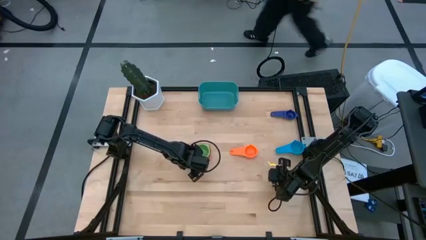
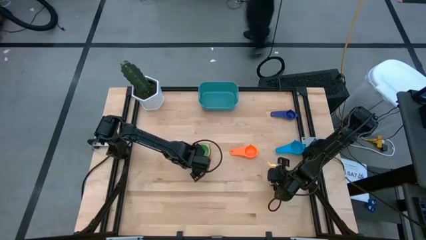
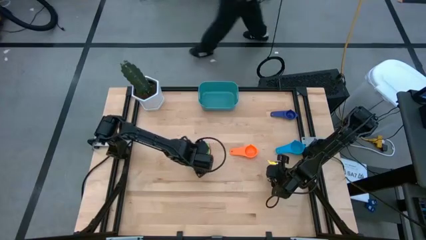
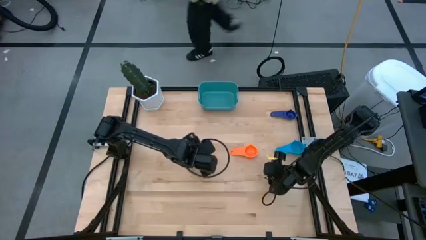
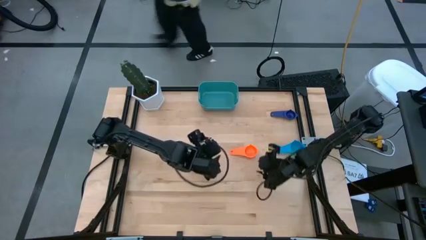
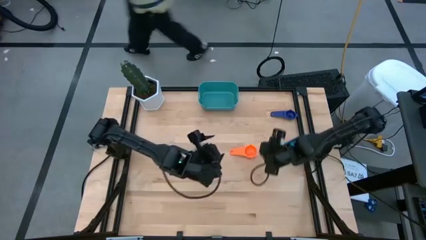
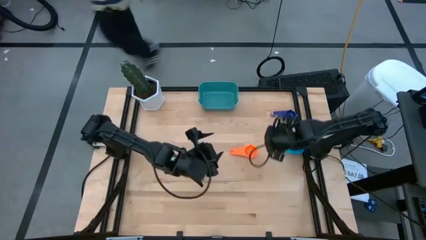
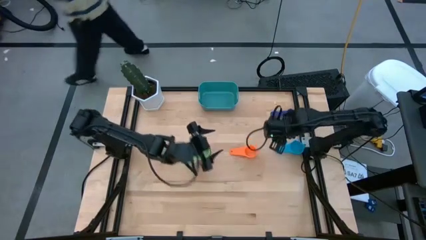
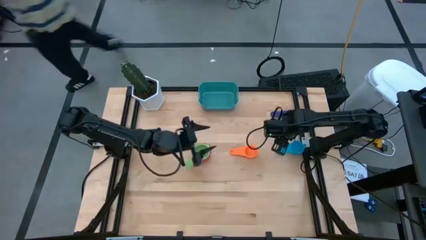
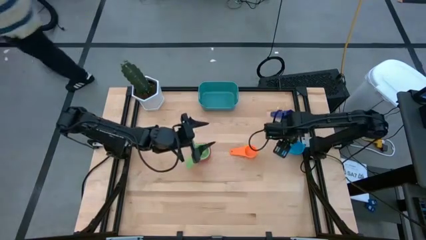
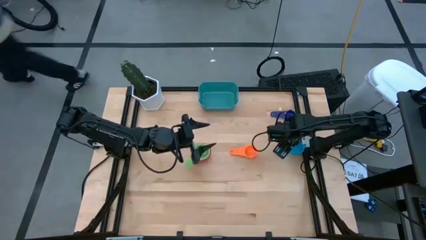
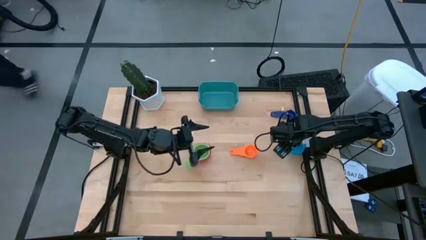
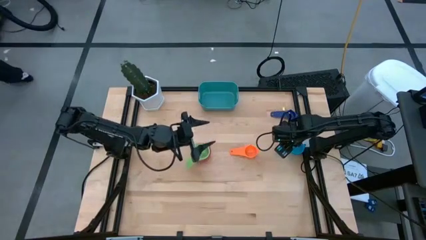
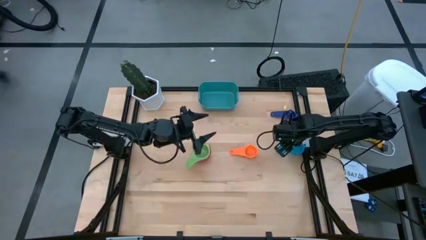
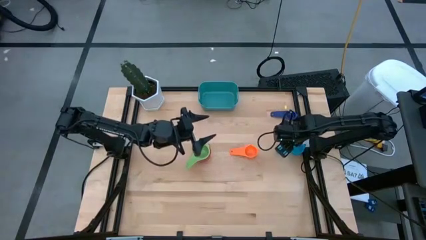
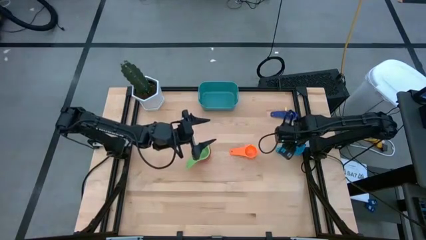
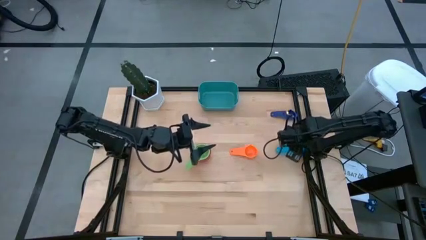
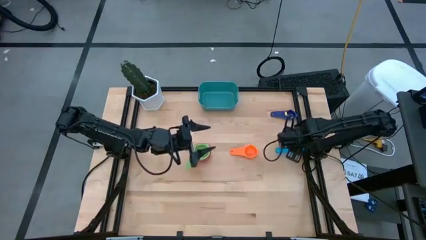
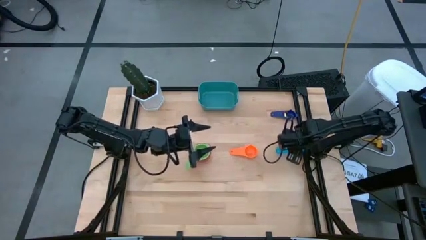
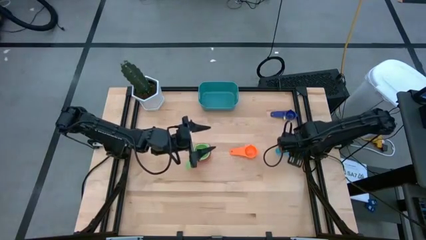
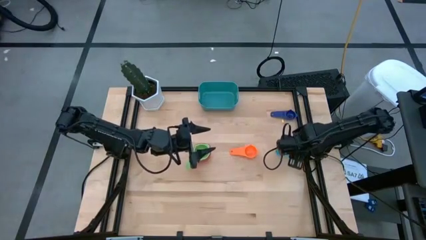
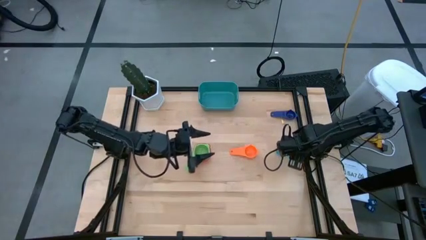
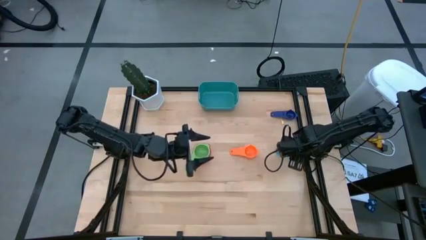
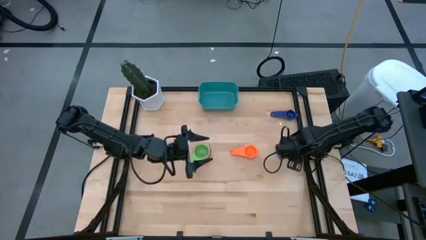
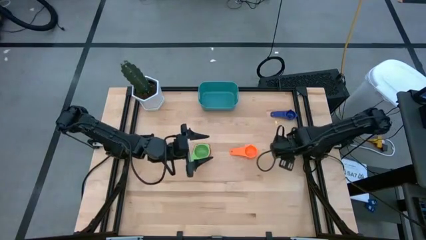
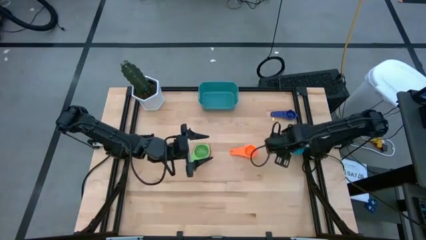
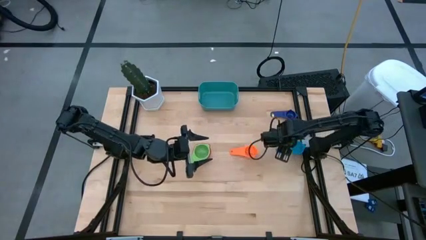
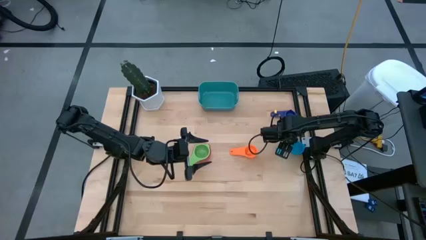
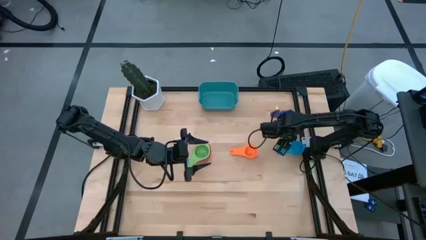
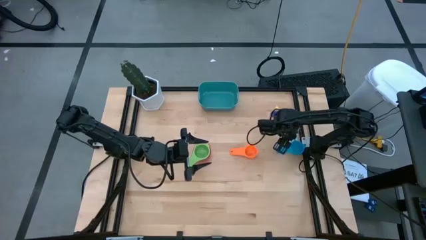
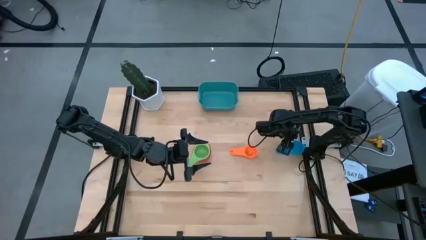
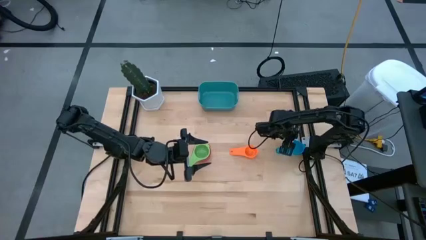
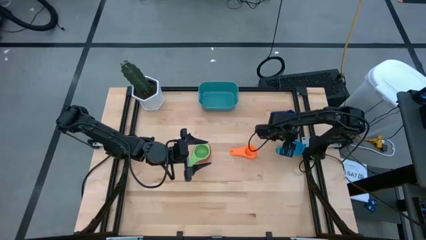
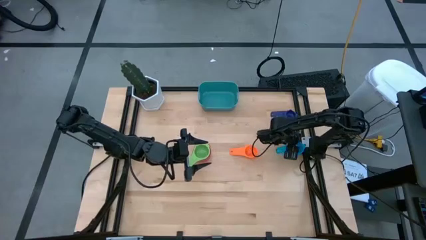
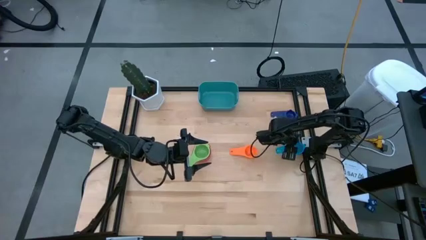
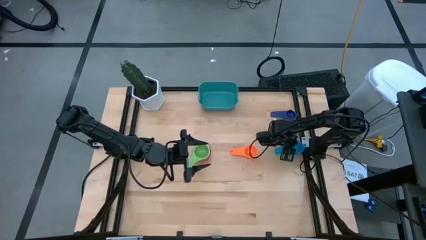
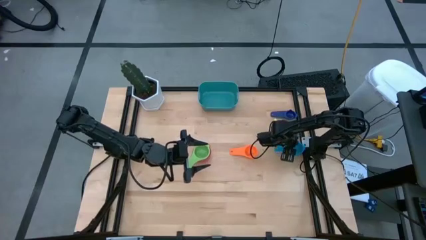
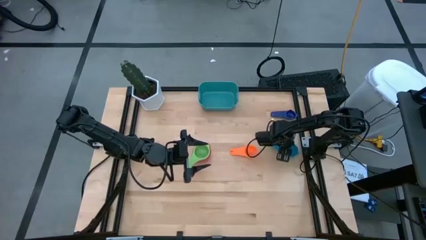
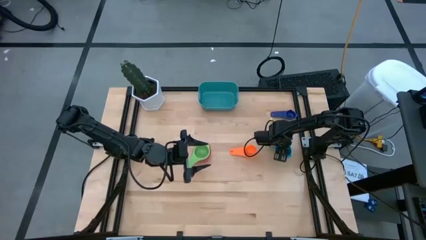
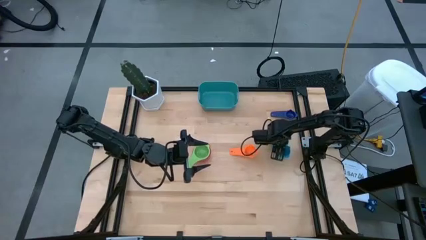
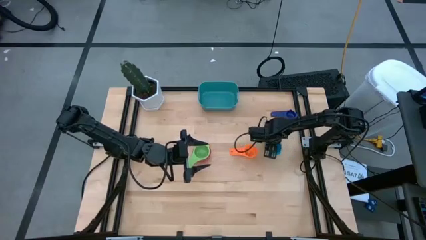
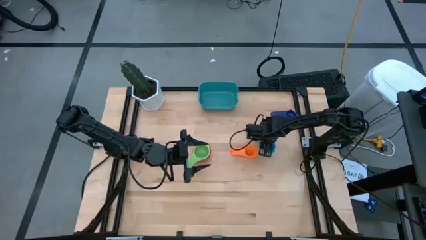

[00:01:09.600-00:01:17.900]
Task: Nest measuring cups in basket
Move the blue measuring cup slightly left on the table

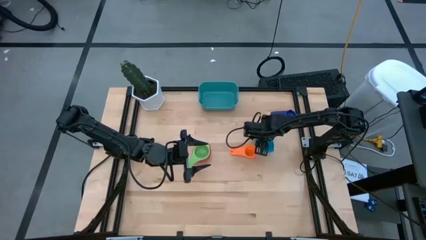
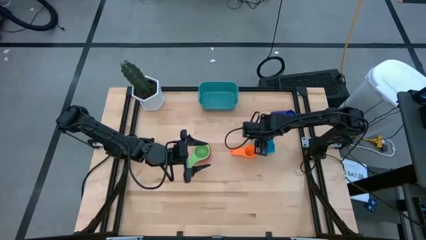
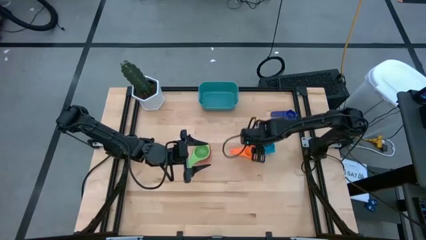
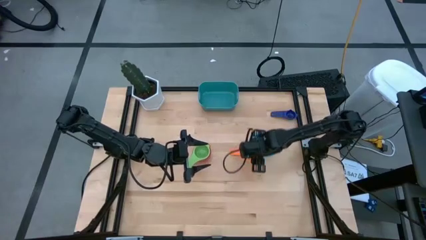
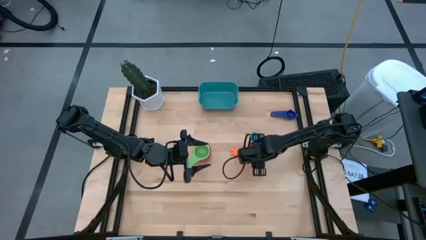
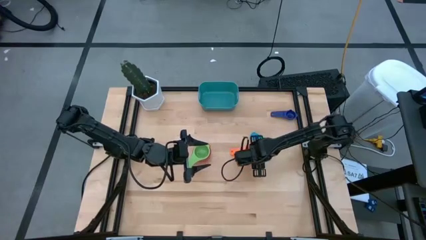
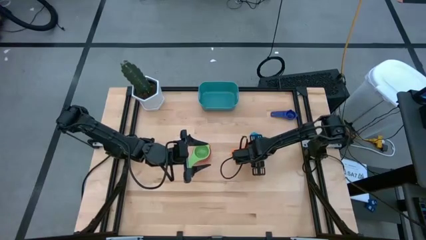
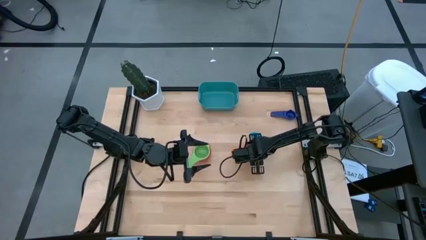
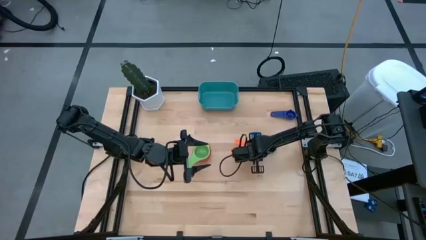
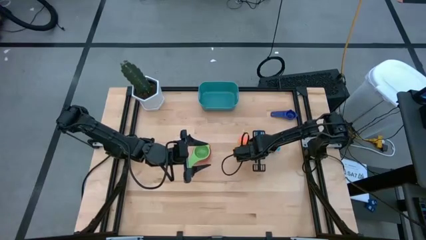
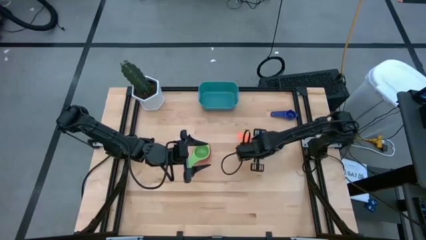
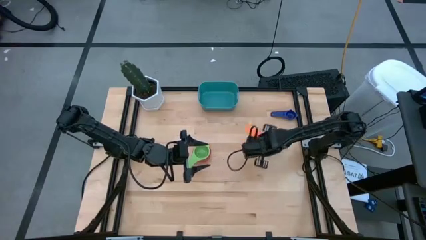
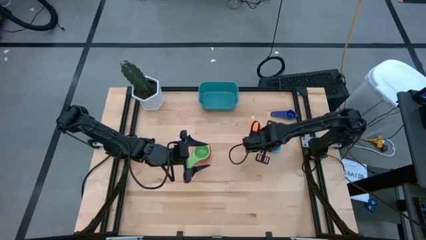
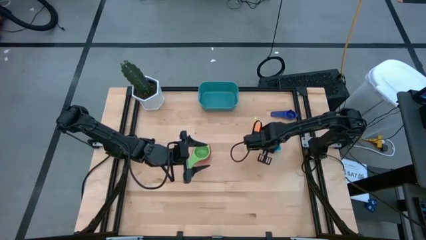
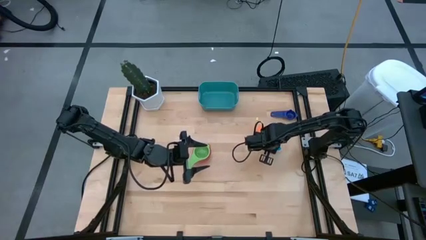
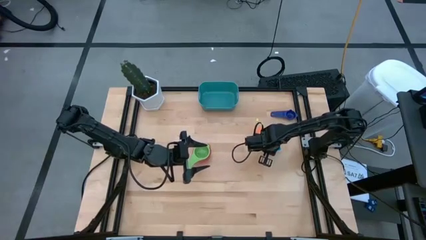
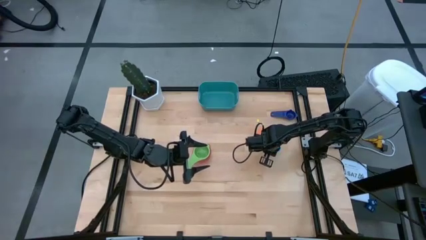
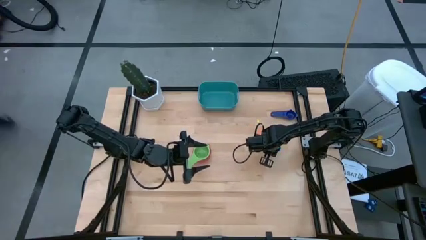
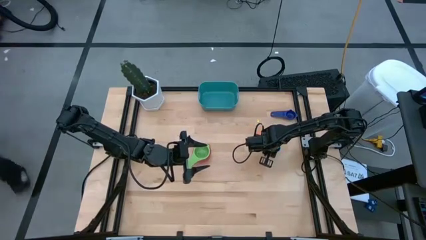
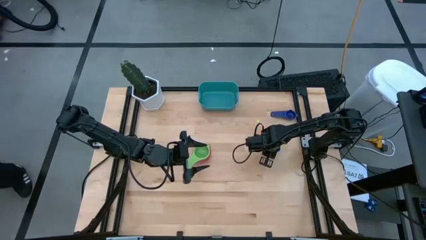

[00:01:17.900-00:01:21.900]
Stack the orange measuring cup on the light blue measuring cup

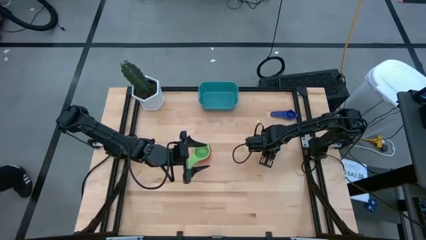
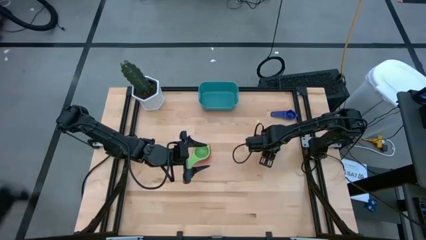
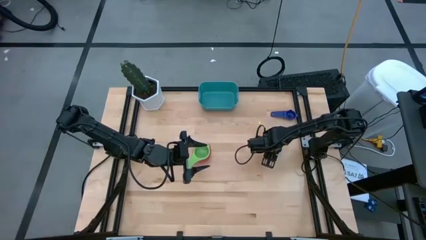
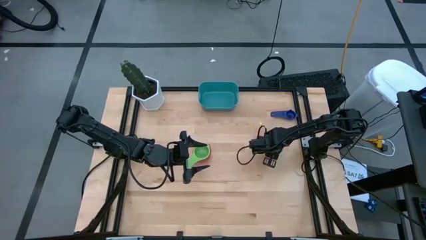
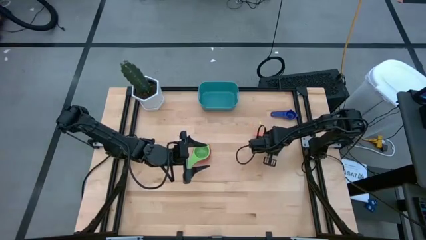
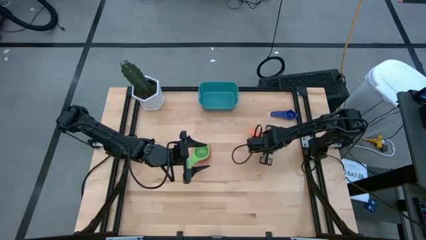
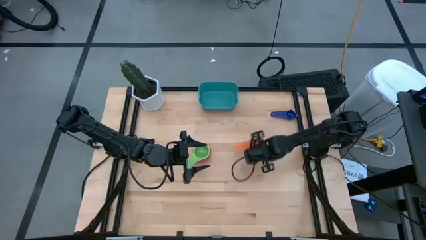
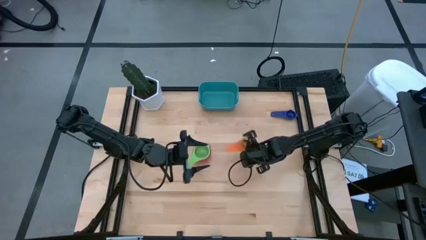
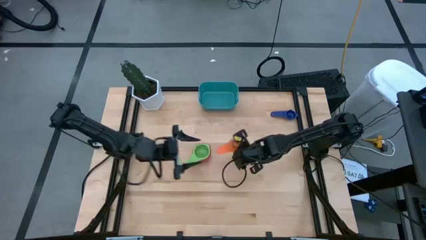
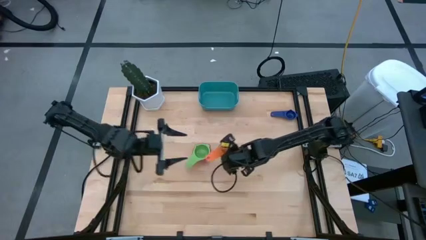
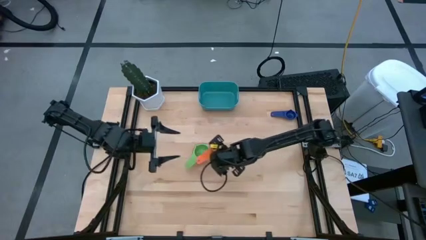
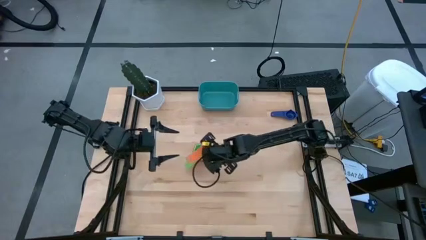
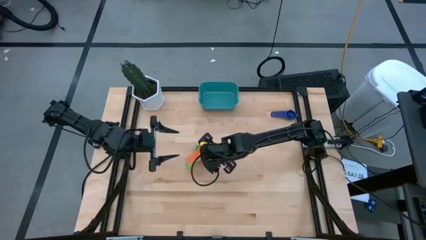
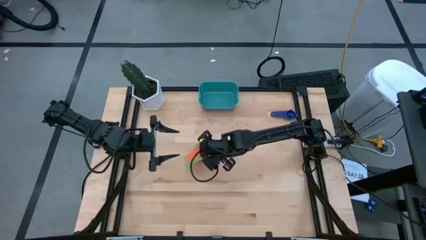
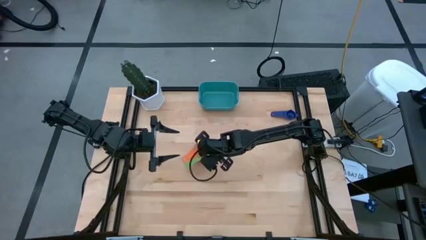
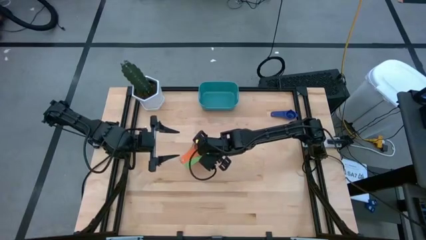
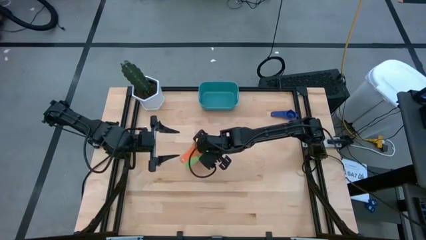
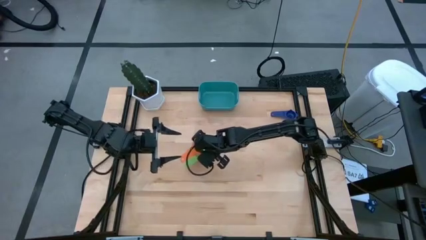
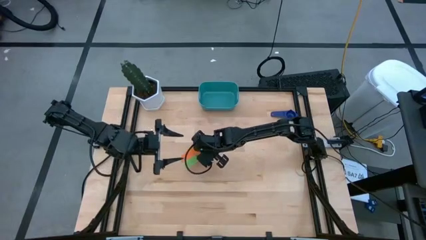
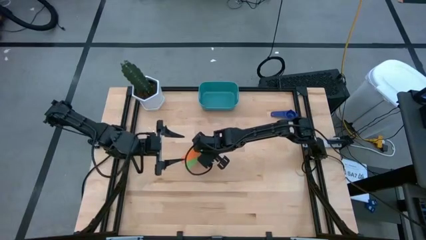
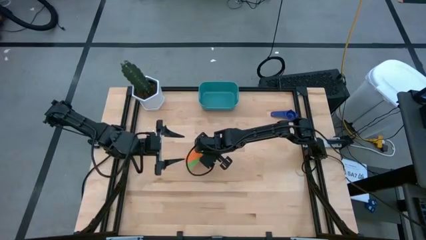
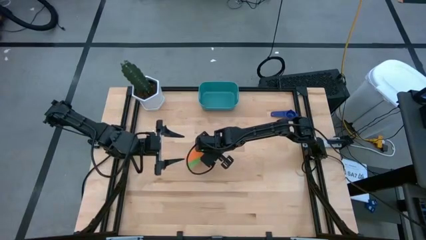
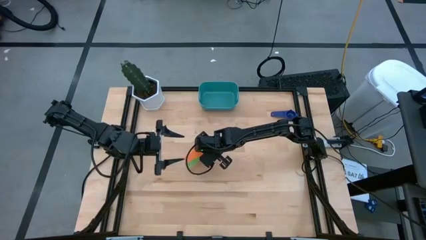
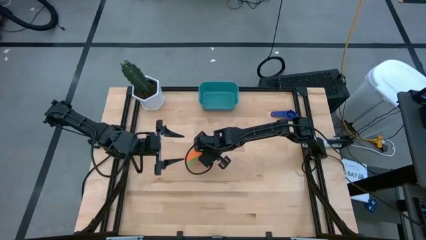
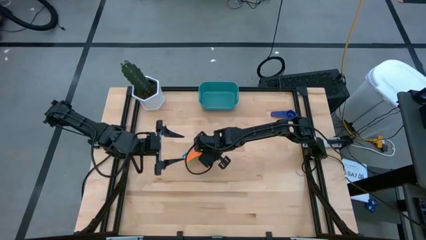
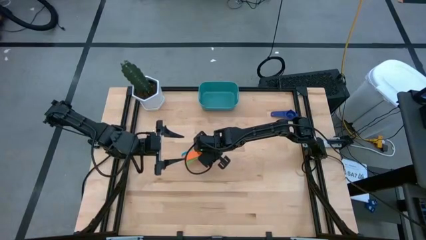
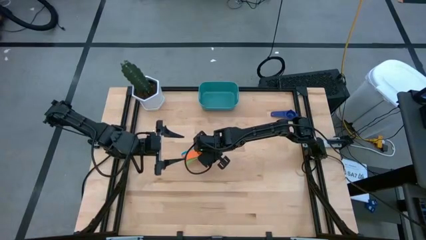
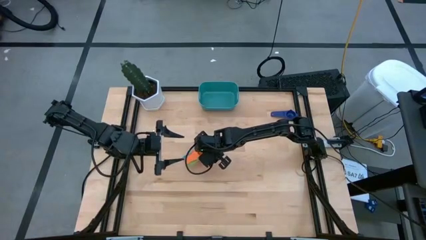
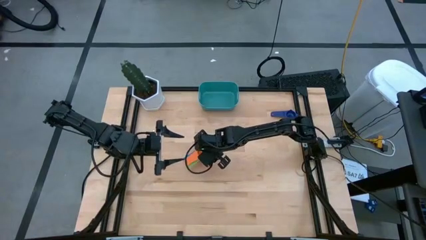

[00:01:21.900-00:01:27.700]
Stack the stacked light blue and orange measuring cup on the green measuring cup
